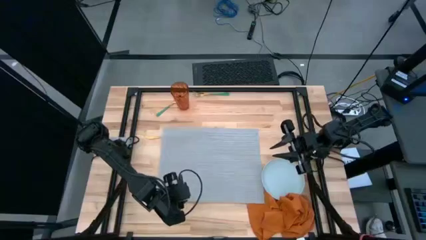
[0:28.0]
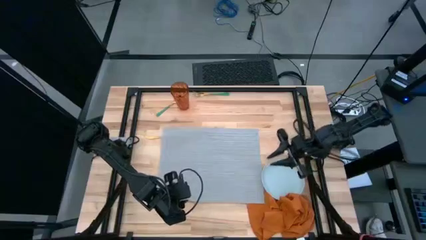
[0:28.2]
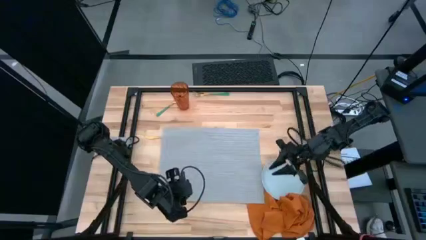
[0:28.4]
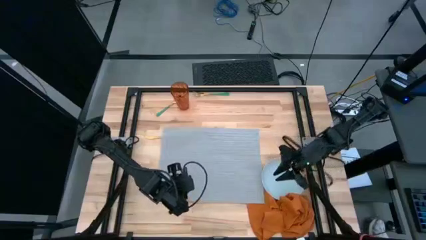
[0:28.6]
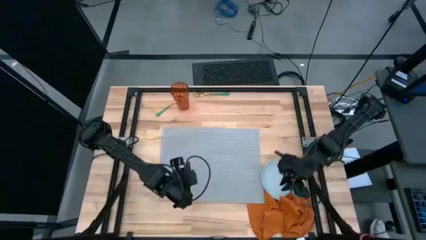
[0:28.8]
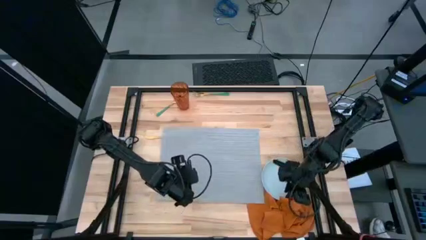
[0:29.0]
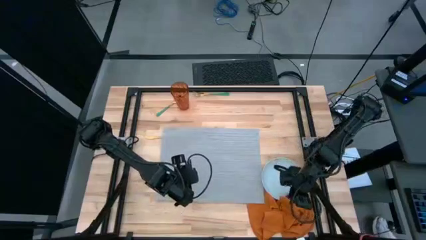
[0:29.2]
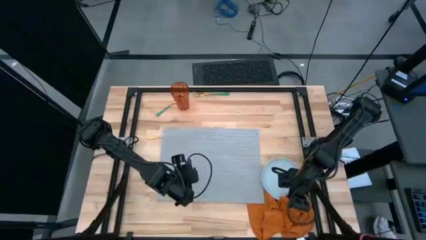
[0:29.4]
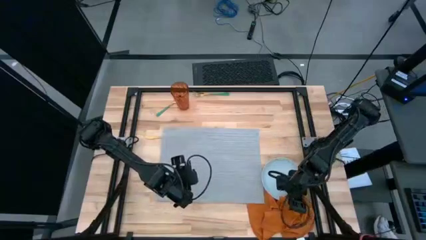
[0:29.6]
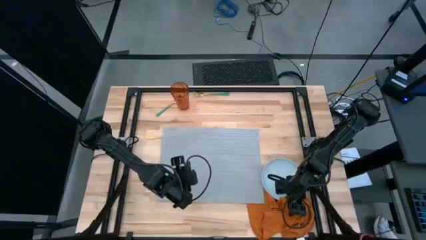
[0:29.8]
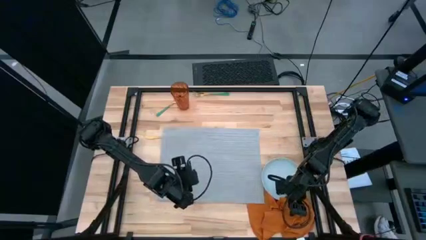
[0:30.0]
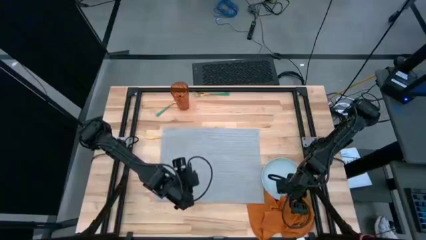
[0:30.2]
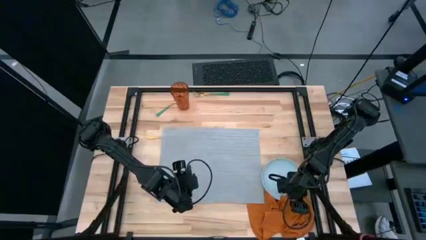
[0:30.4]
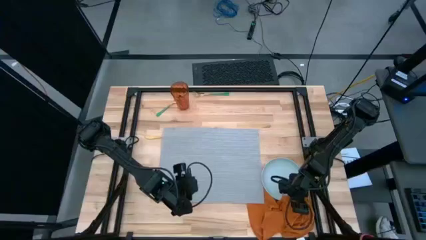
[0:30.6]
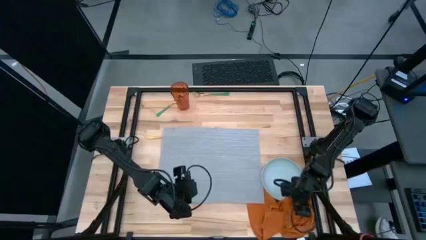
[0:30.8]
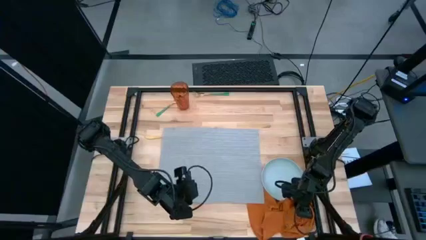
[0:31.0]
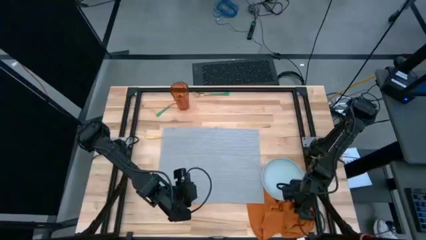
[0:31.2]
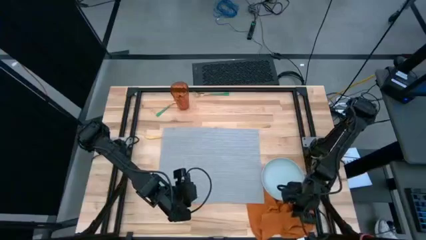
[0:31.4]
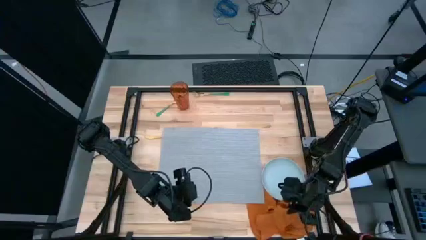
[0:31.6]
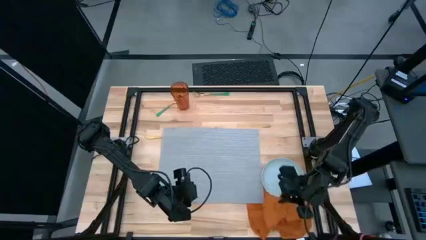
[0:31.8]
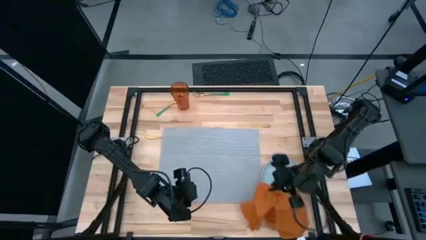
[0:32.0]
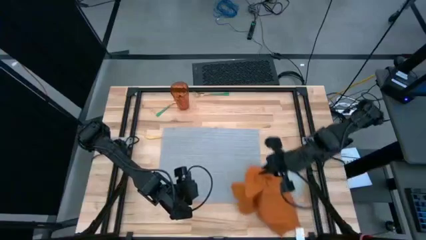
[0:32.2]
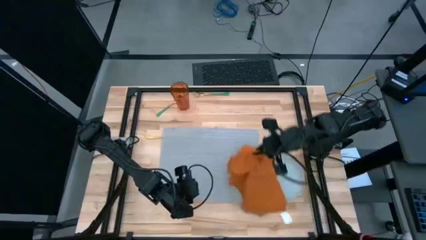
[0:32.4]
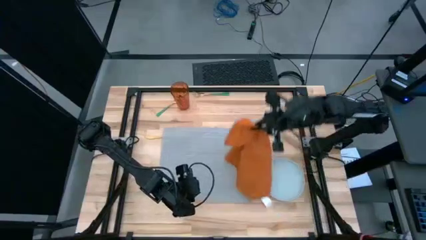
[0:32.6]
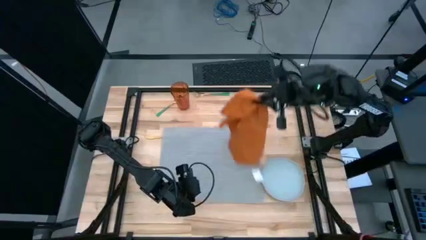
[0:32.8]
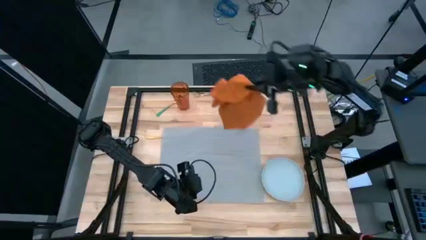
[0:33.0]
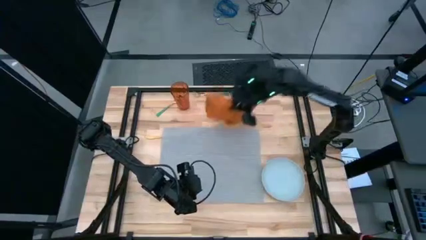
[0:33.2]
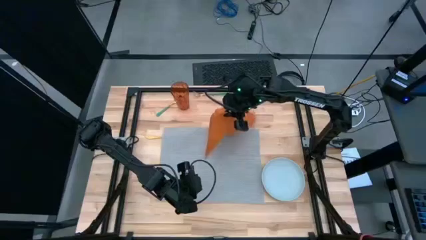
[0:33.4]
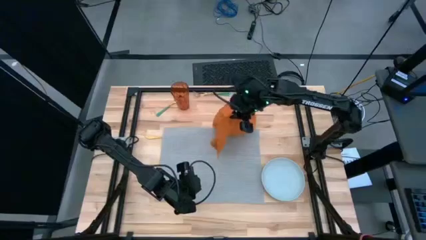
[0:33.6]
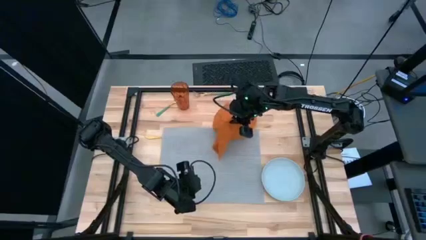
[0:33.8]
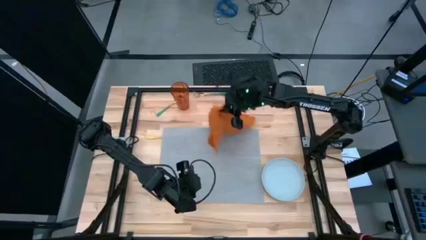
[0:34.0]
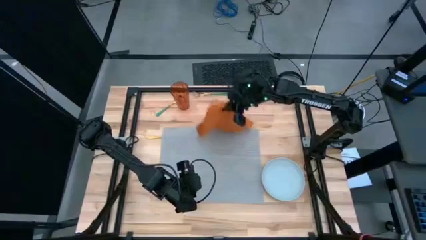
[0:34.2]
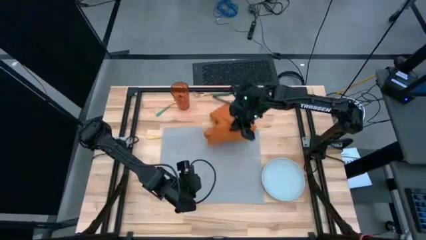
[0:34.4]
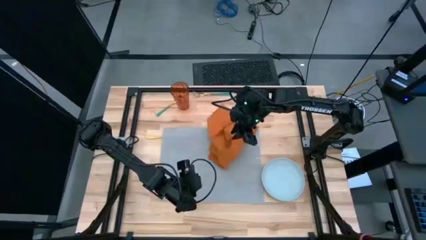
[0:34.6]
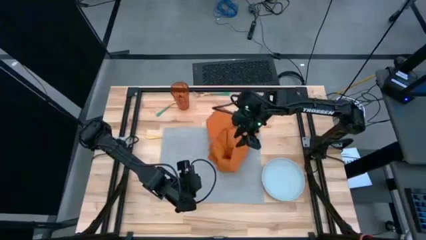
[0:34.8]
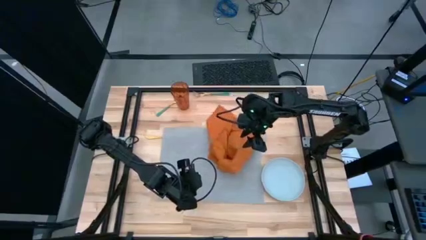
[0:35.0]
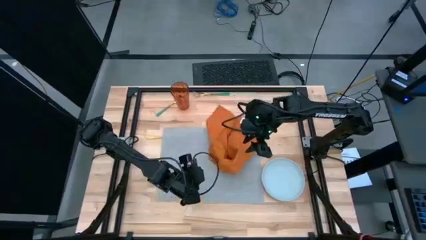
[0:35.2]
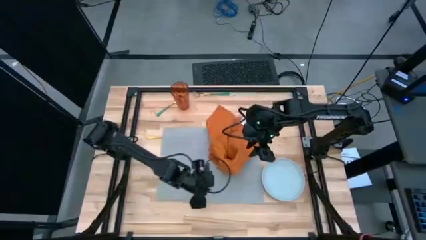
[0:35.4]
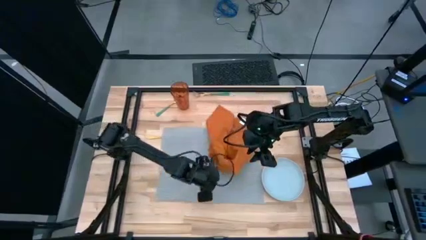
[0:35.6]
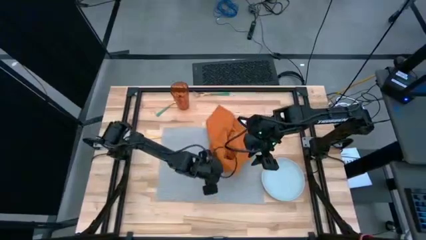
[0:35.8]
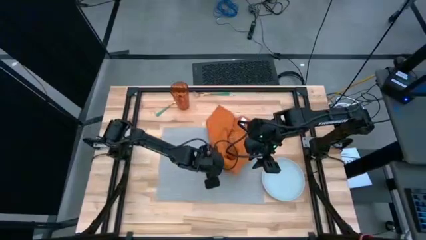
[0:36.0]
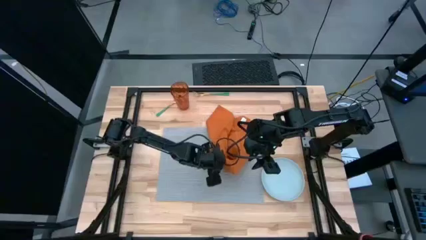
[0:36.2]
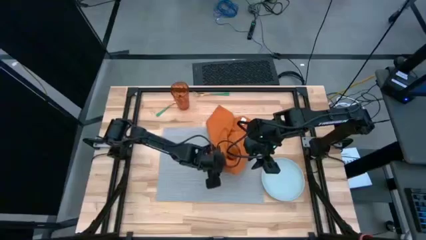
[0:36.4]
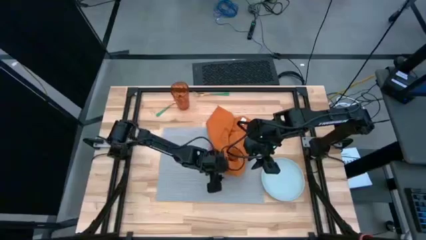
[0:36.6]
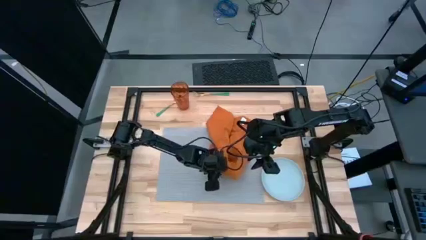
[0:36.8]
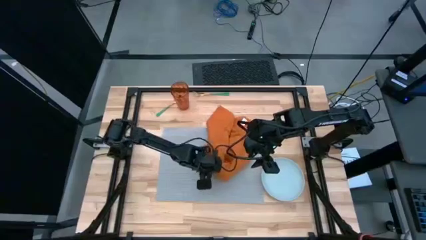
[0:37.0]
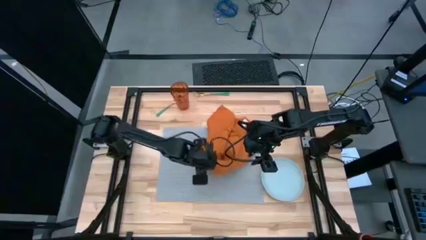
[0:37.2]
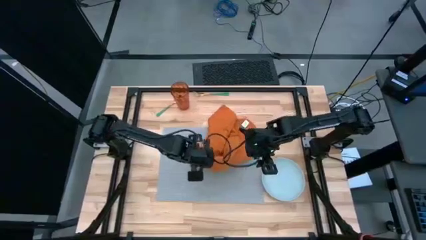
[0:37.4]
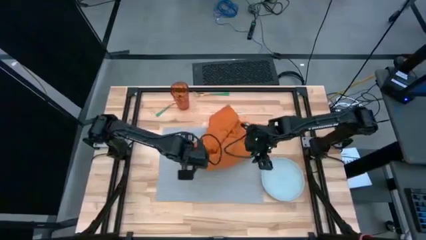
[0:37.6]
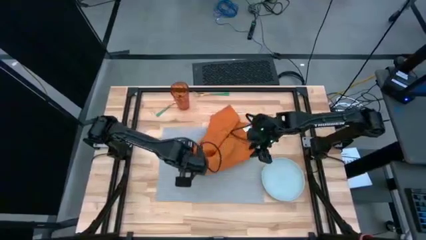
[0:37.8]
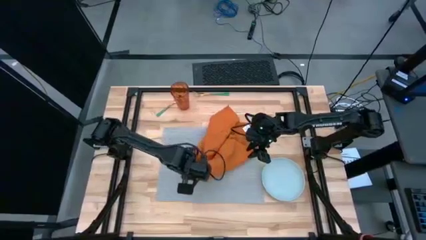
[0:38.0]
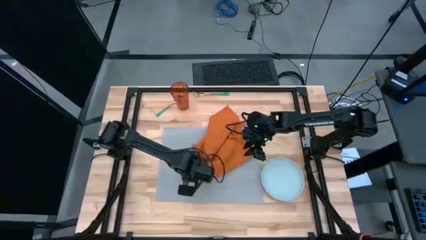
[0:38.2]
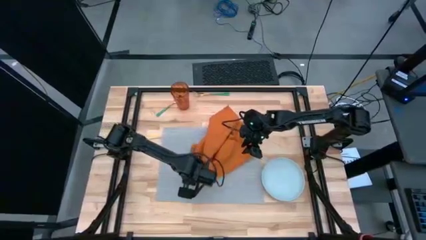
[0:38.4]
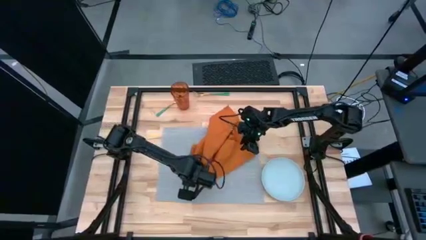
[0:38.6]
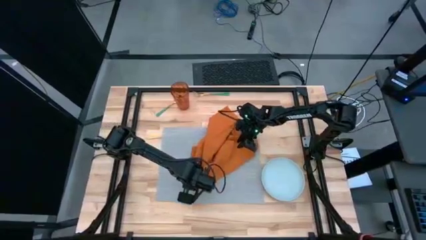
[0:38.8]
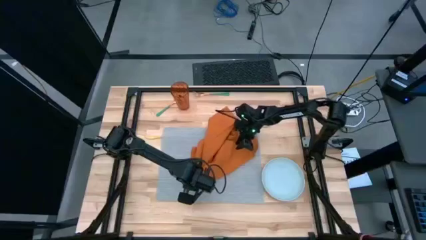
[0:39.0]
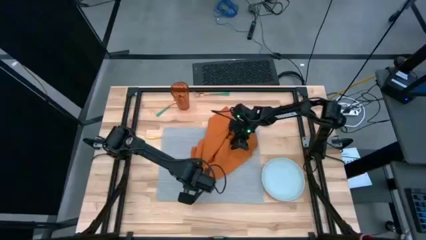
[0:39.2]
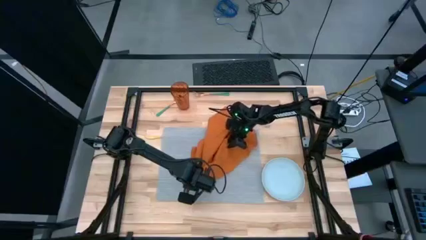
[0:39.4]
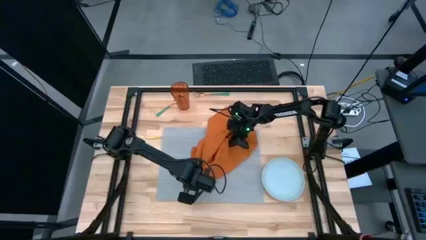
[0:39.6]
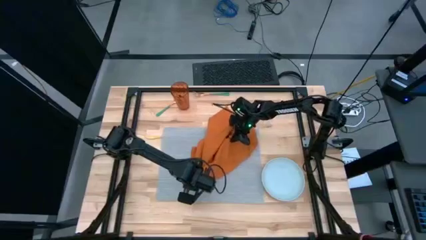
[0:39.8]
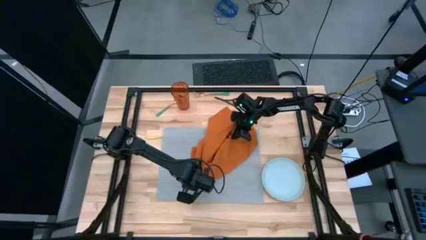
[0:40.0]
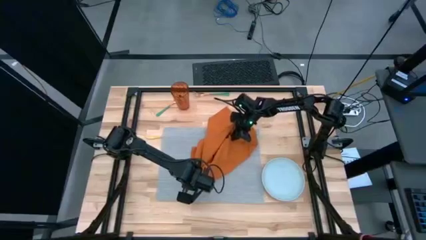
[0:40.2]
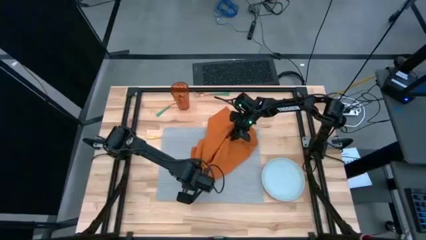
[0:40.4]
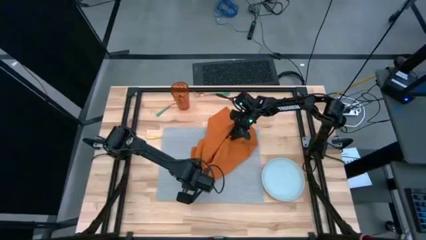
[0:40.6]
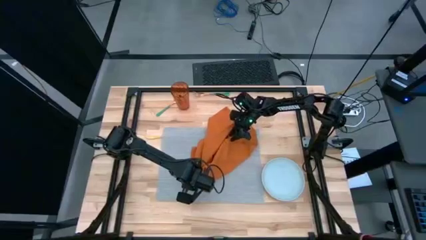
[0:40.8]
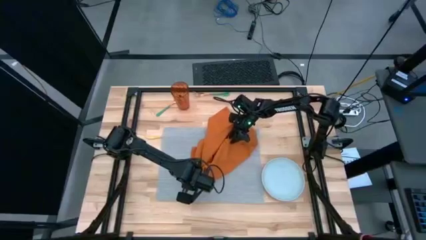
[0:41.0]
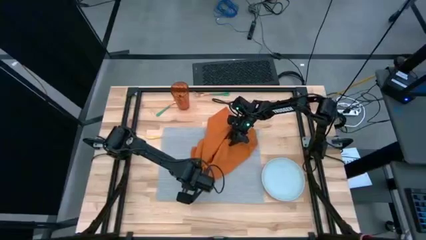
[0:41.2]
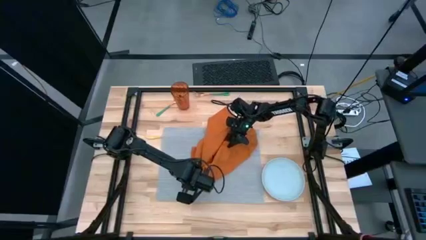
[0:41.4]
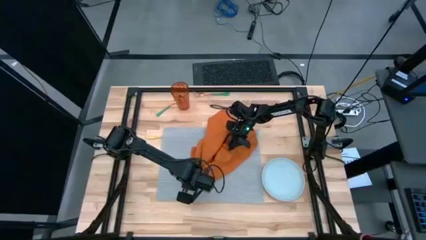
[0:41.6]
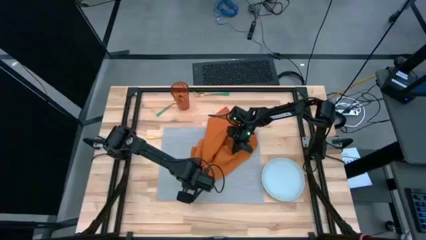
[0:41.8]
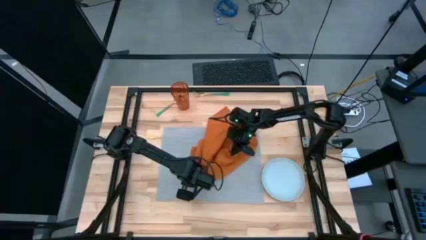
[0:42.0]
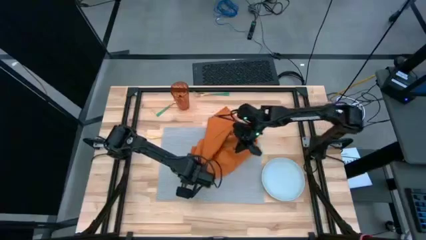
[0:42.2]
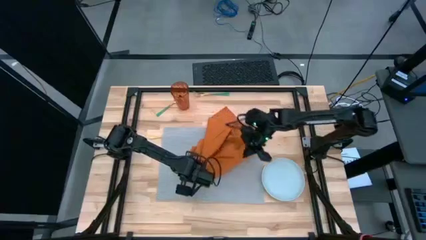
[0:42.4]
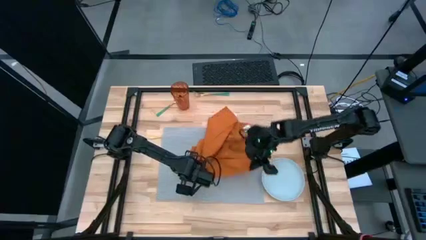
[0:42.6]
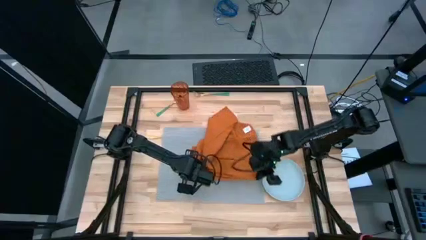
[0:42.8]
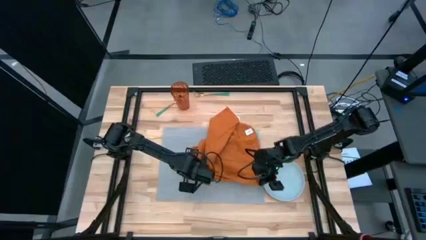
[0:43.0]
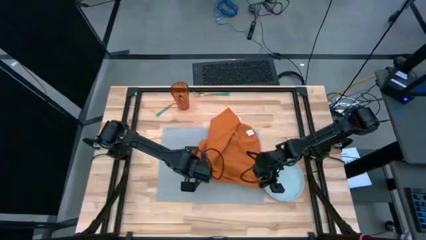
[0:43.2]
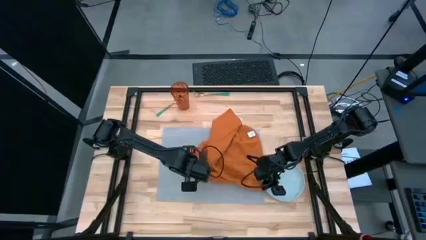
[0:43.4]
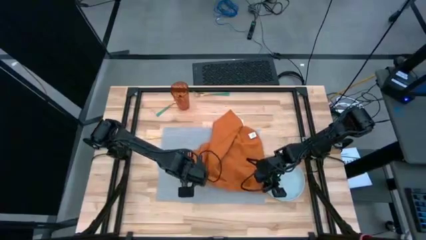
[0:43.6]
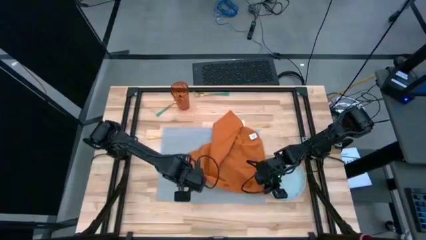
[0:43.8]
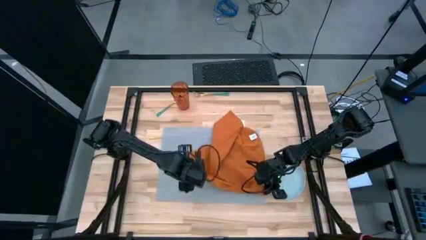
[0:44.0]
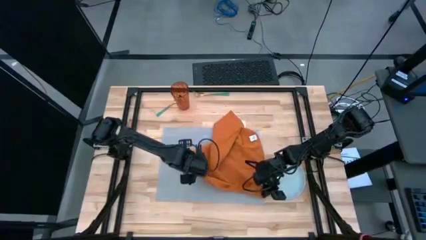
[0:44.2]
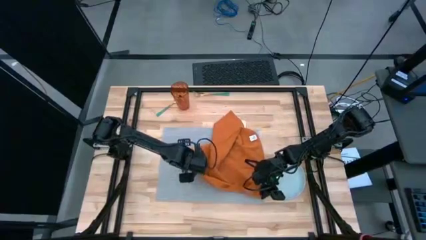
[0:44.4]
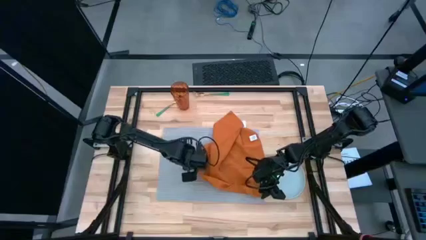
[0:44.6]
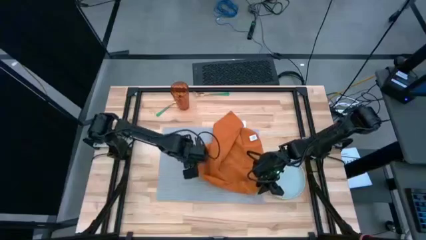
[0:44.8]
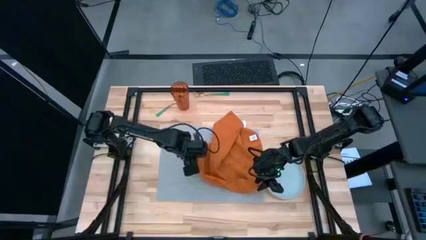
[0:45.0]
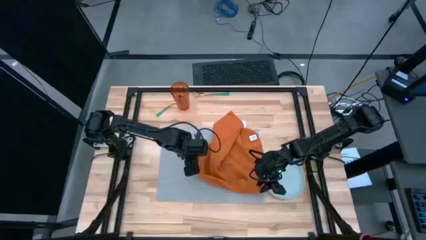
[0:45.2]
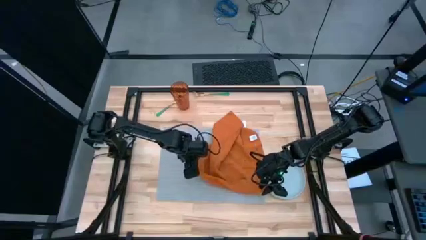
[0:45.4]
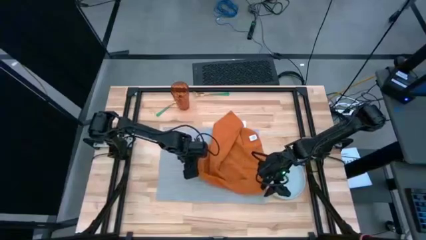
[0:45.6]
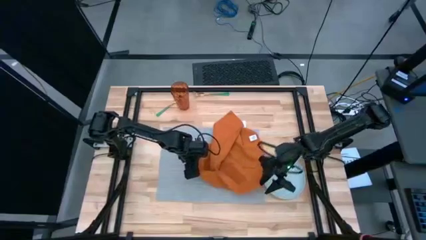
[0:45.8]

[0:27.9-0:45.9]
Task: Set table place
Fold the orange table napkin
